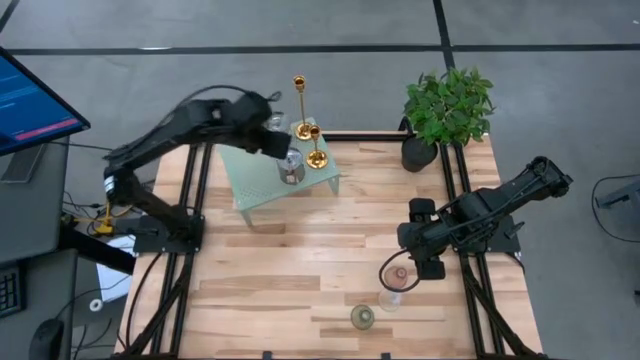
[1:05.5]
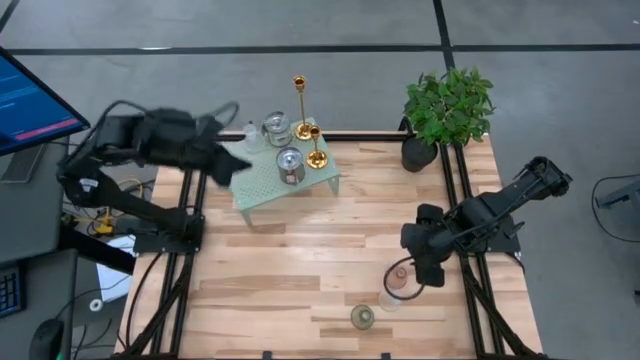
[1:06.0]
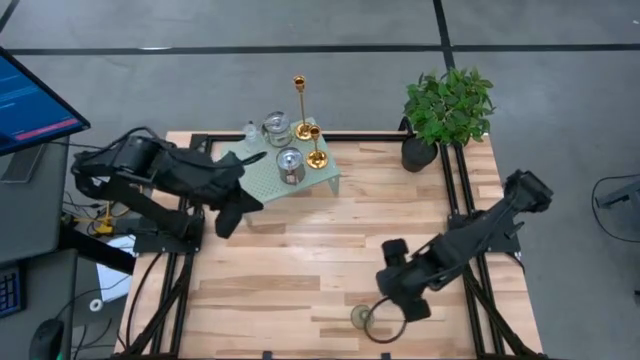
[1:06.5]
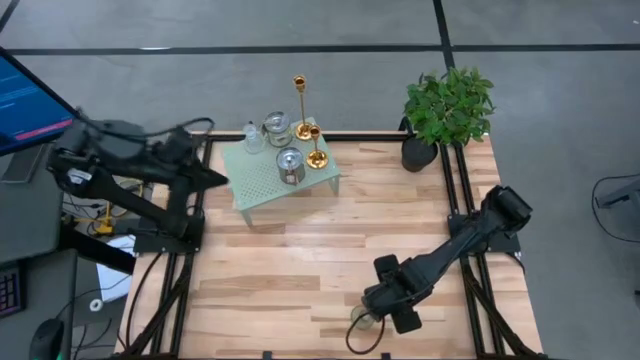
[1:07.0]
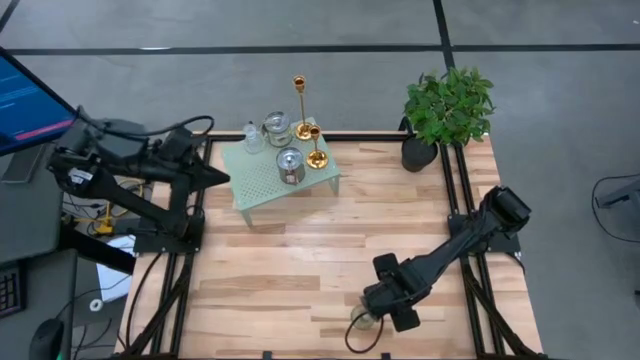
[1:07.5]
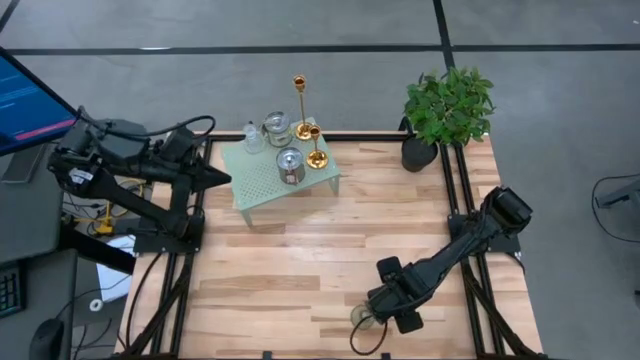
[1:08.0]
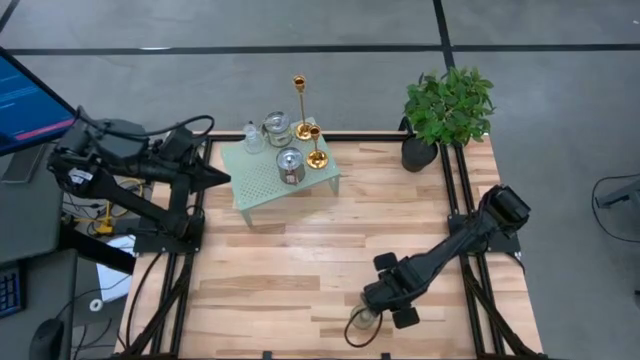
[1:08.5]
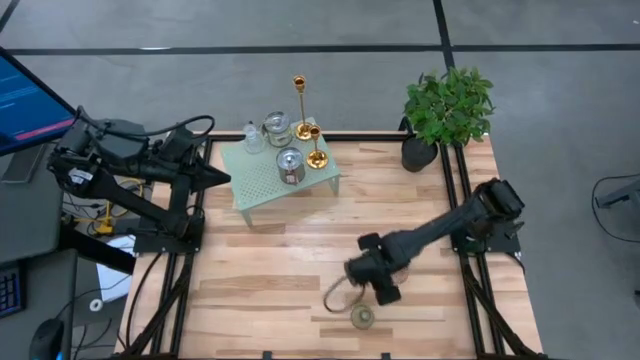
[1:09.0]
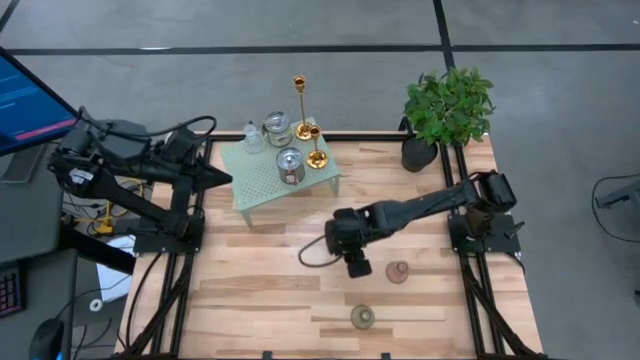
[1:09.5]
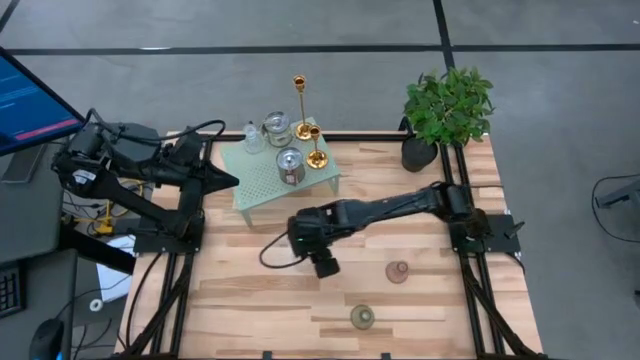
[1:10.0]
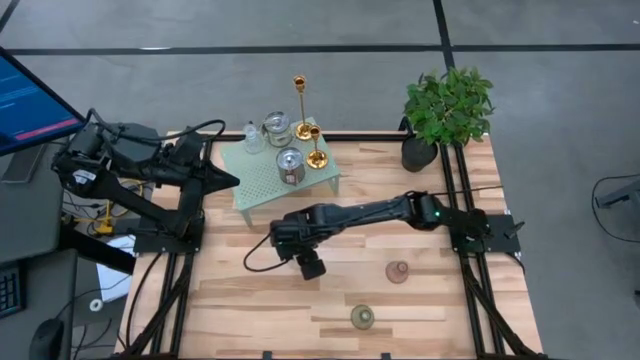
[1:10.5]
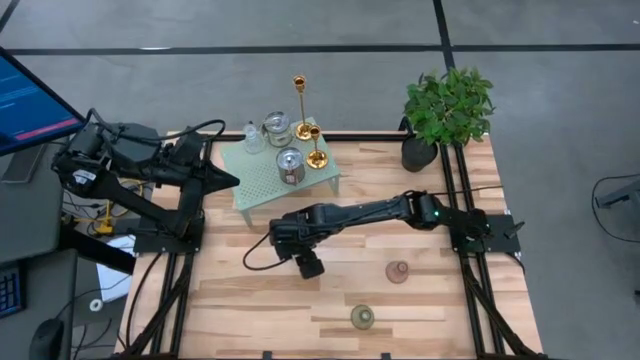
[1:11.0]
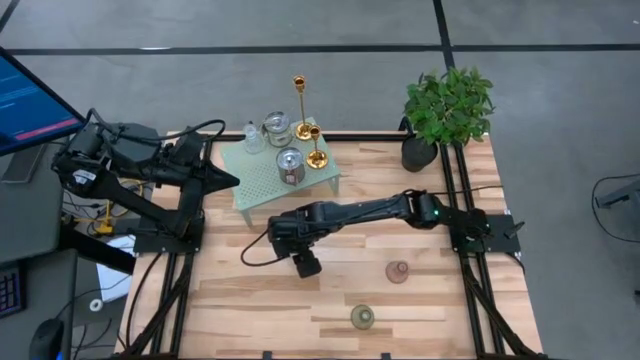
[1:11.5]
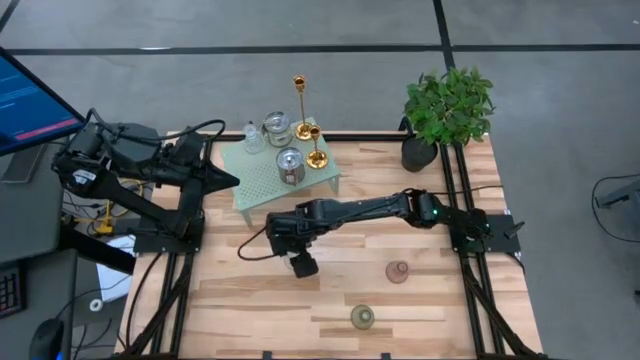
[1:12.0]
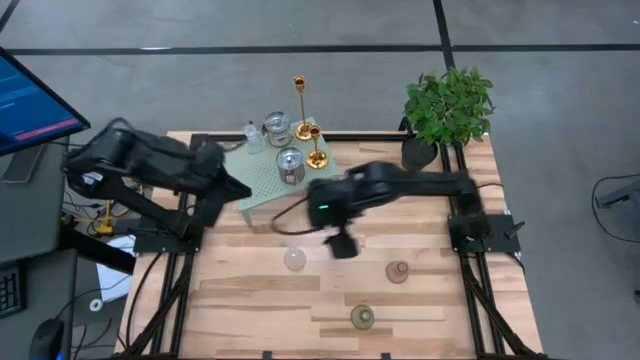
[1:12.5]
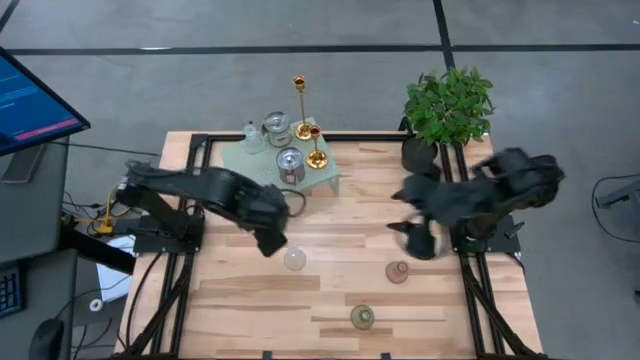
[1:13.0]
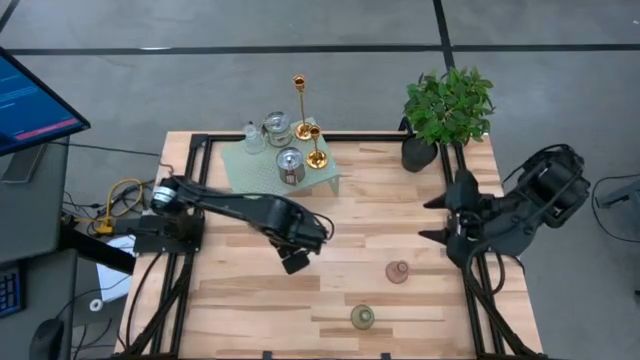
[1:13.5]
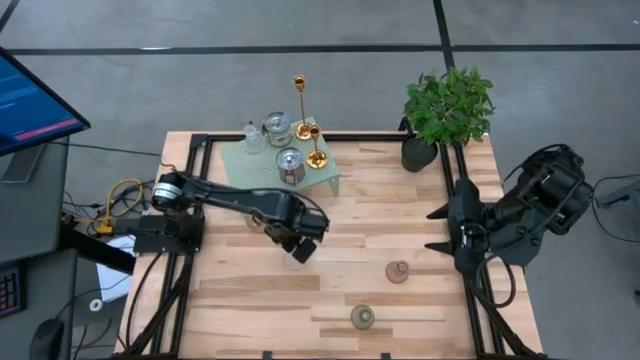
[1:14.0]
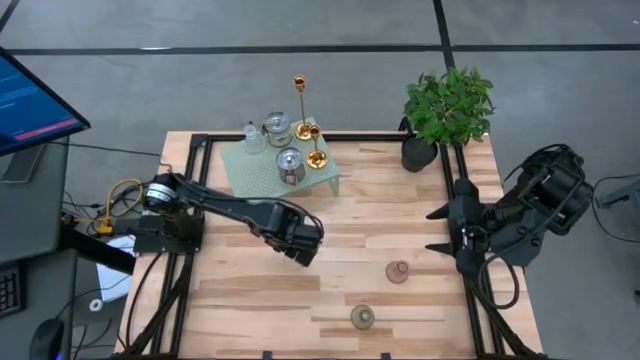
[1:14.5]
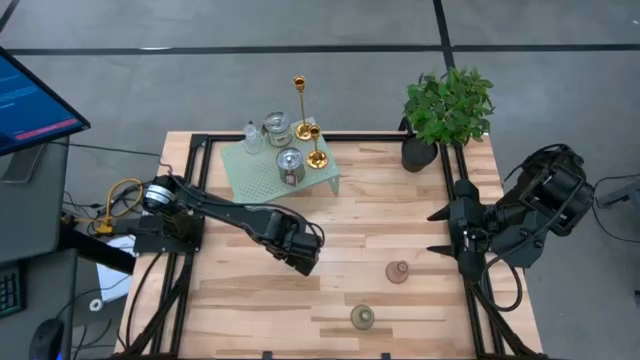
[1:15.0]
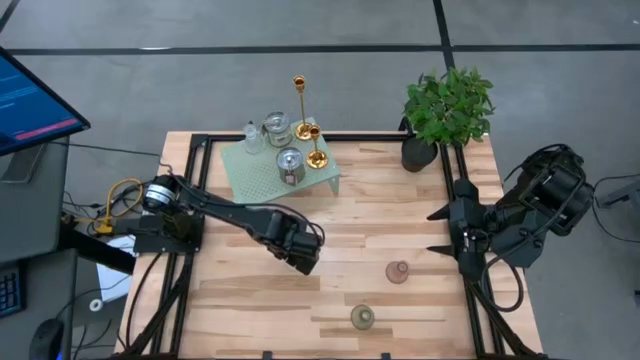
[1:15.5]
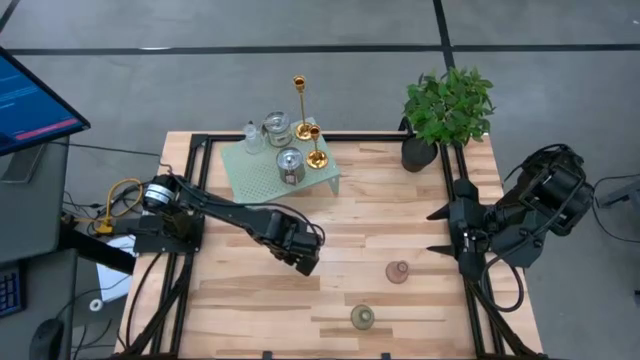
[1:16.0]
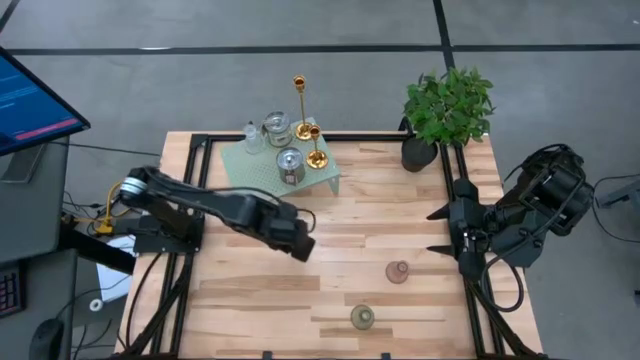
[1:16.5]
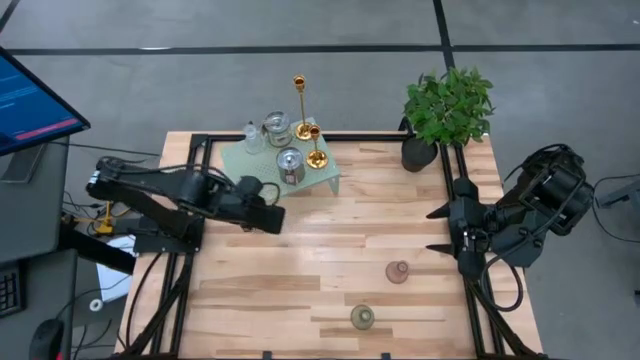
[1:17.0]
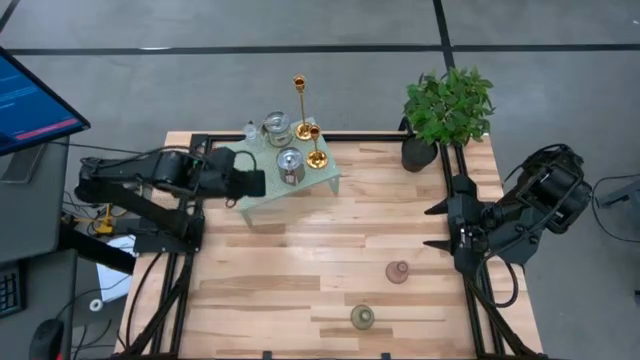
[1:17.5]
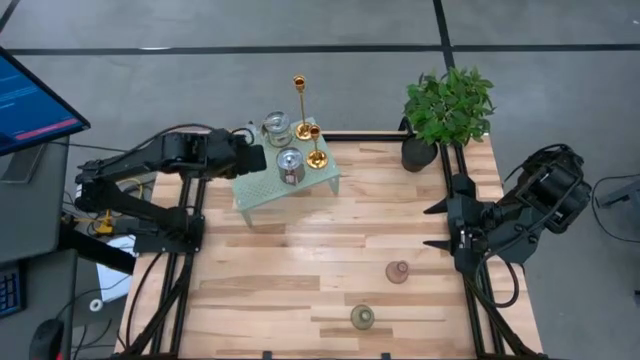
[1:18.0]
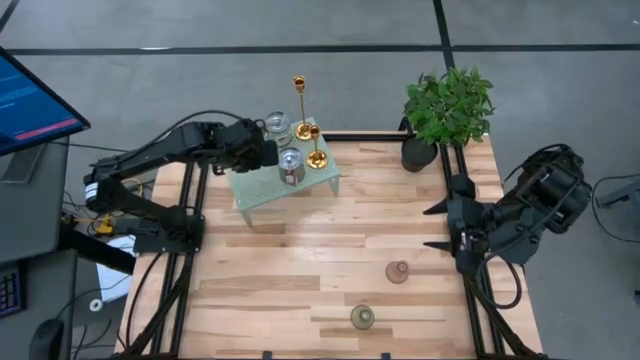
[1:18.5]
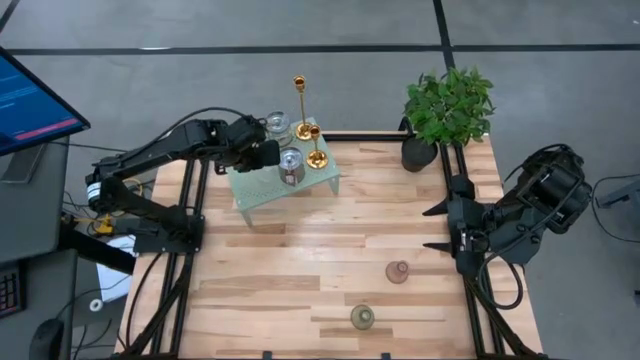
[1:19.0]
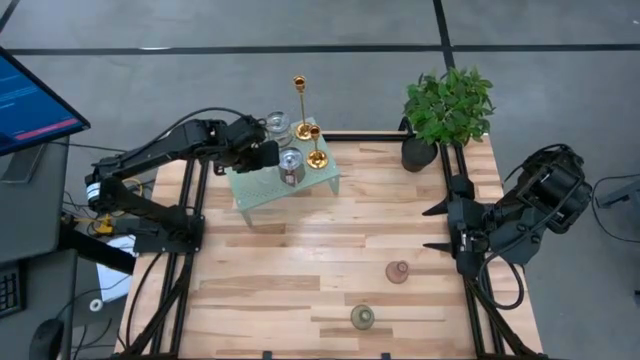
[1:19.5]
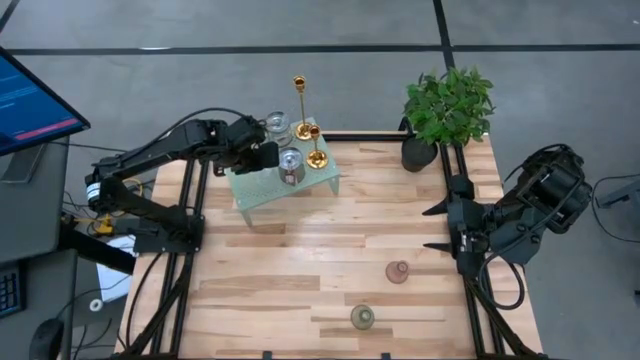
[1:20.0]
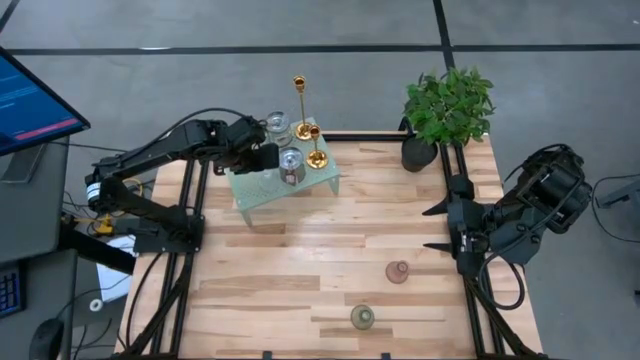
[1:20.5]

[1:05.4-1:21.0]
Task: Pick & Place candle stick holders
Align the transparent candle holder with the other transparent candle holder on the shelf

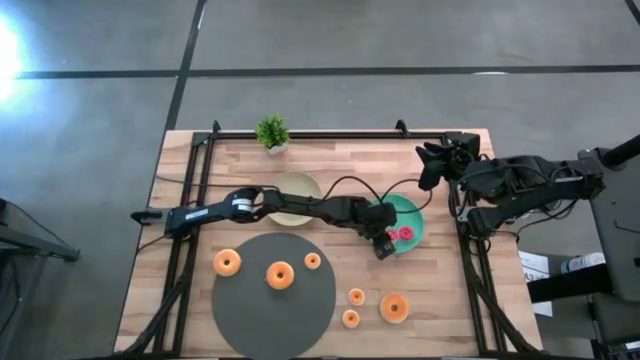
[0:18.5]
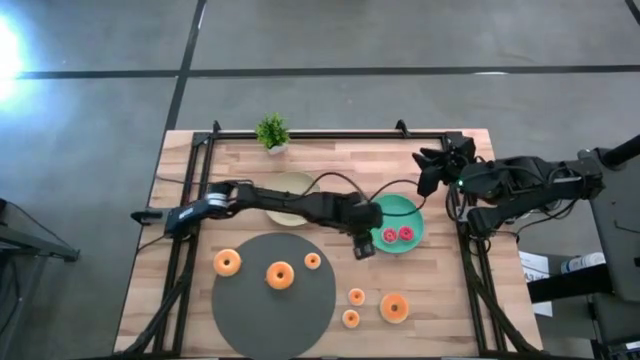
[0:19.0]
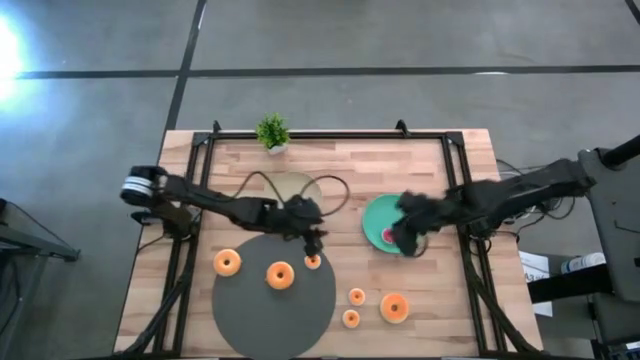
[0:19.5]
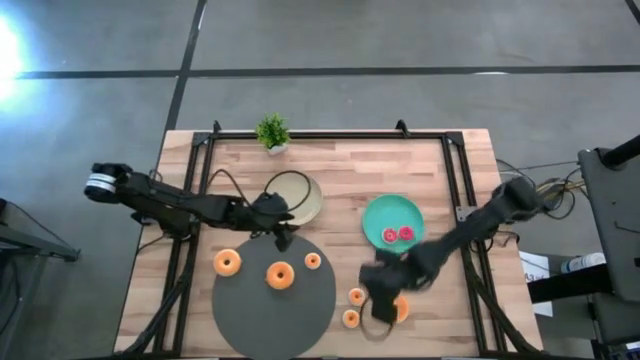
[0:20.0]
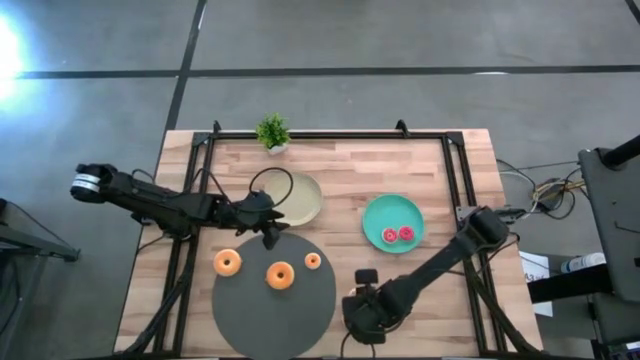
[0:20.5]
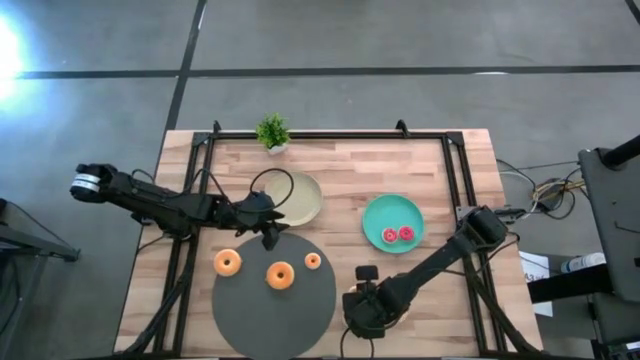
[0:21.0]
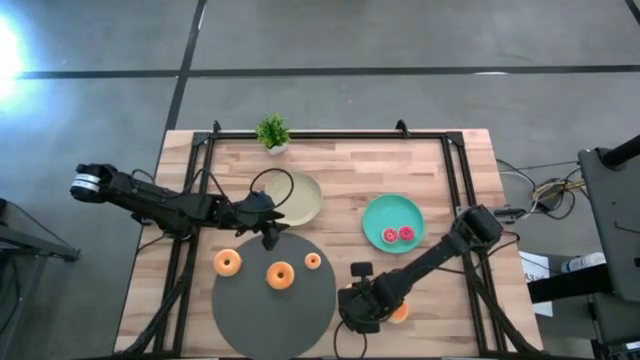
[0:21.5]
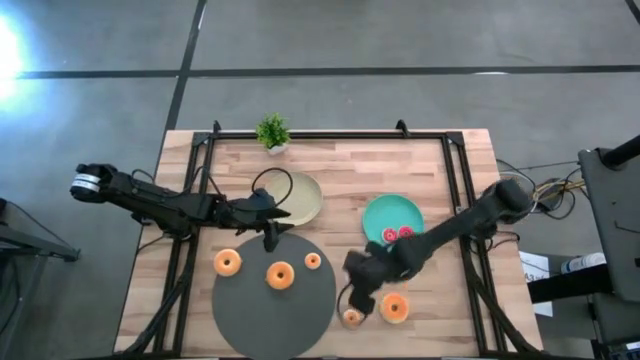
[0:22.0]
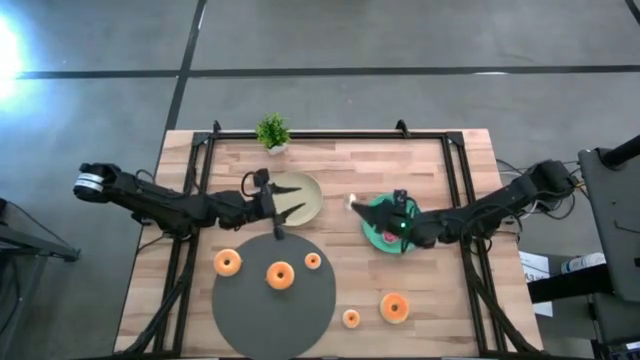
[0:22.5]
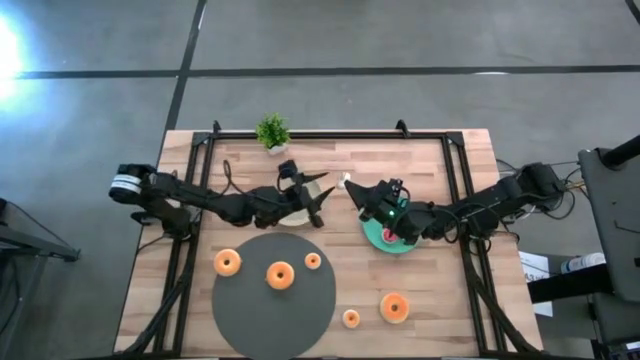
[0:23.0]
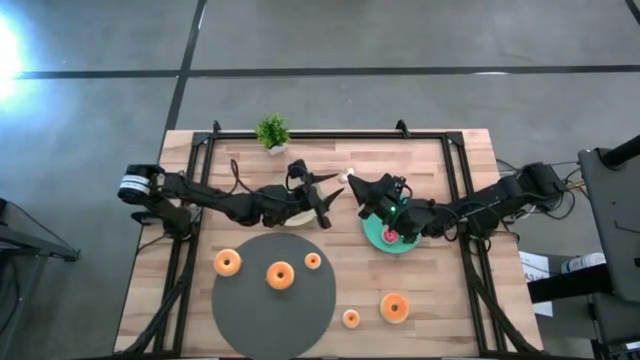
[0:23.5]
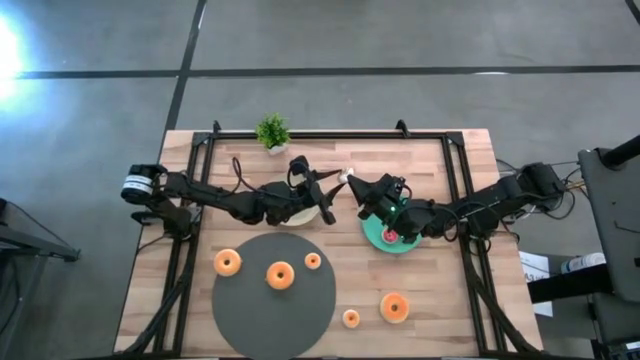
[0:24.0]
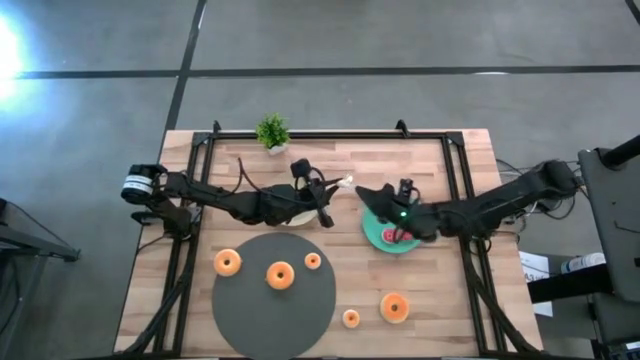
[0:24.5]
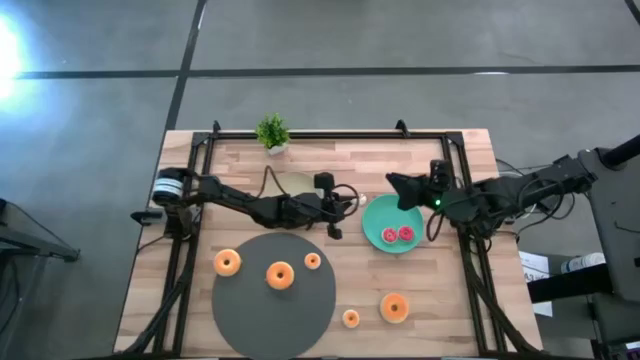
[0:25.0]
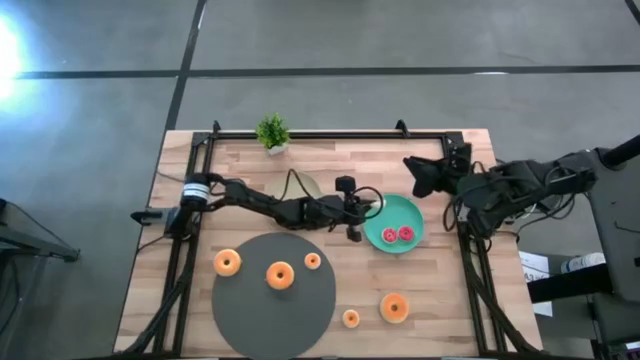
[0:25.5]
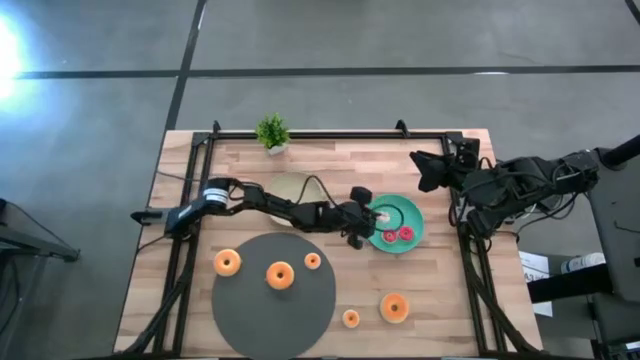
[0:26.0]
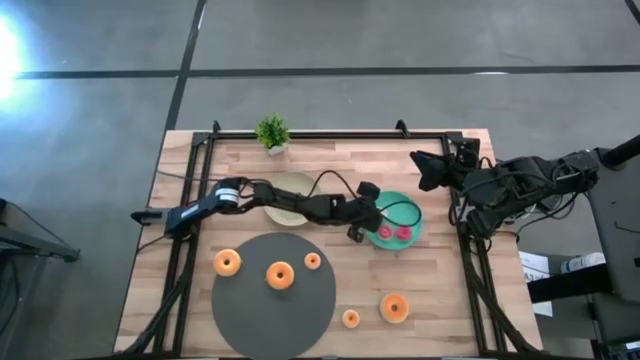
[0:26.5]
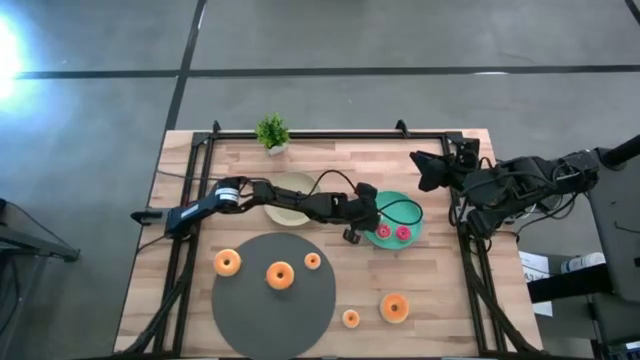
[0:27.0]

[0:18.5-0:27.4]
Task: Pick & Place donuts
Put the small white donut on the blue plate
